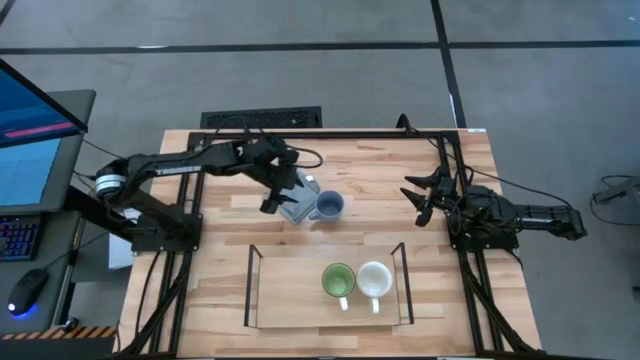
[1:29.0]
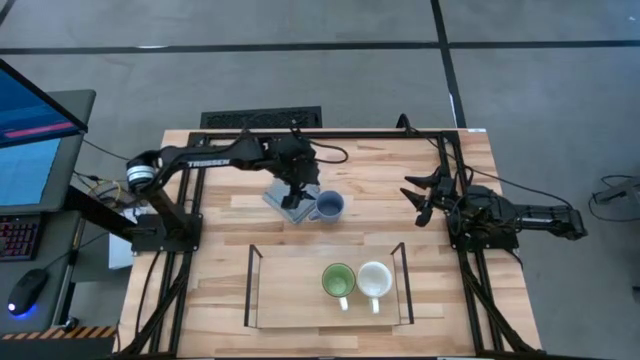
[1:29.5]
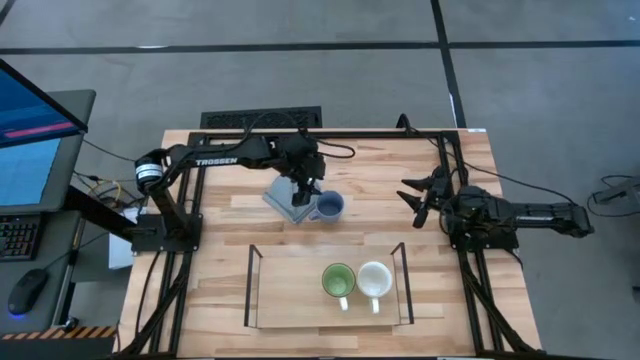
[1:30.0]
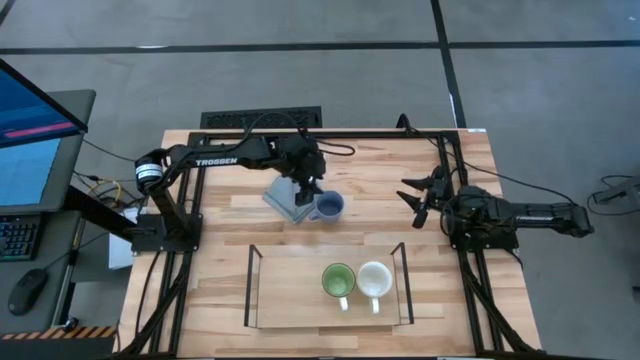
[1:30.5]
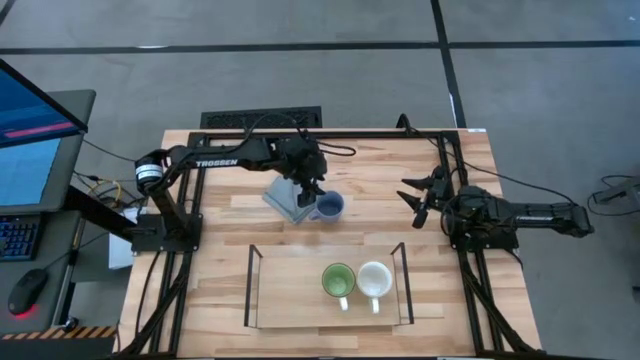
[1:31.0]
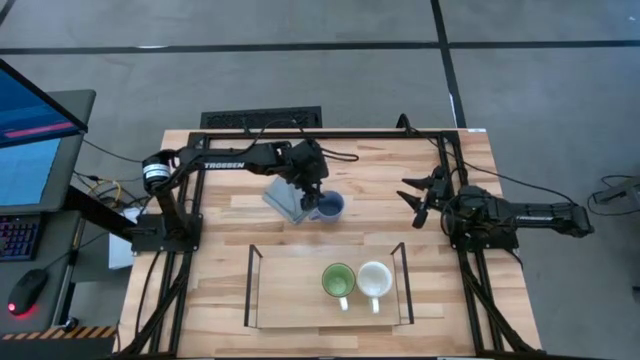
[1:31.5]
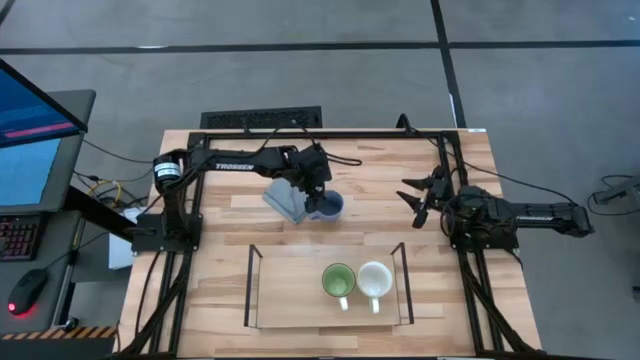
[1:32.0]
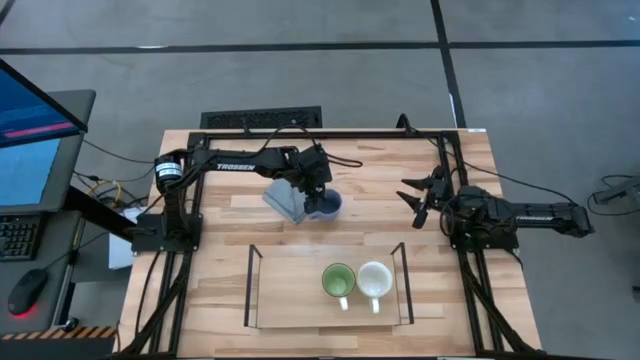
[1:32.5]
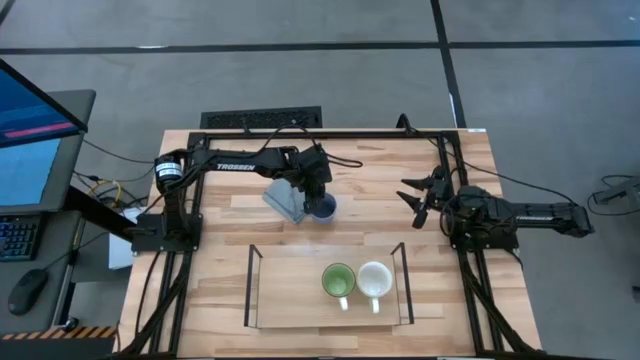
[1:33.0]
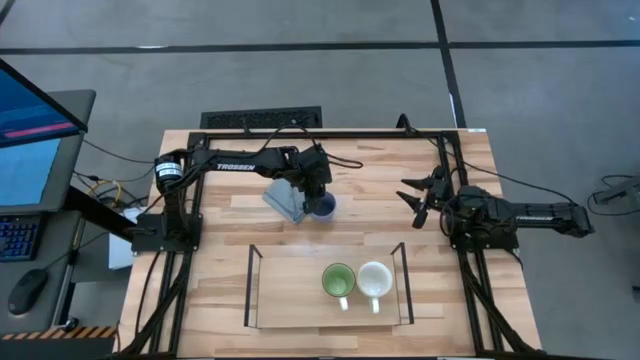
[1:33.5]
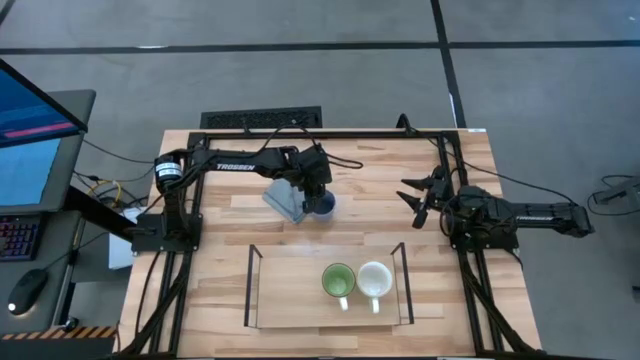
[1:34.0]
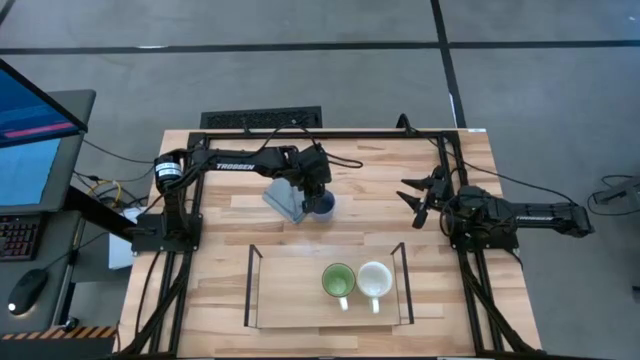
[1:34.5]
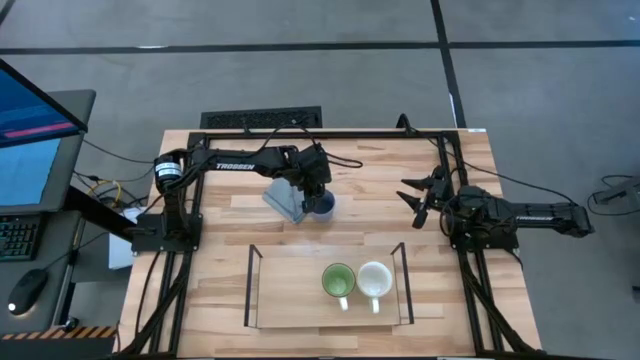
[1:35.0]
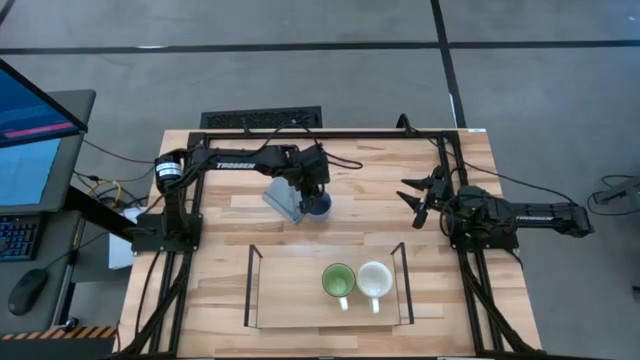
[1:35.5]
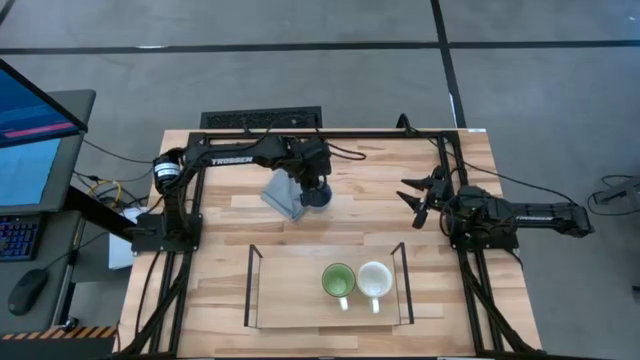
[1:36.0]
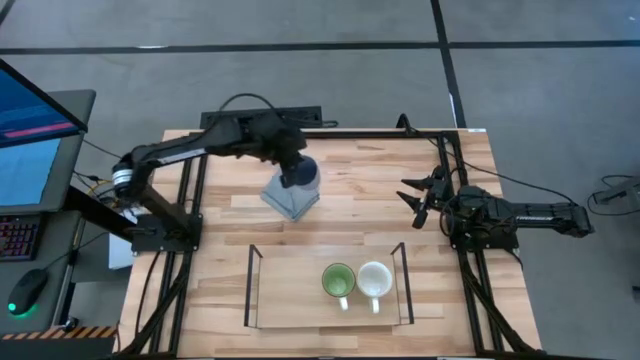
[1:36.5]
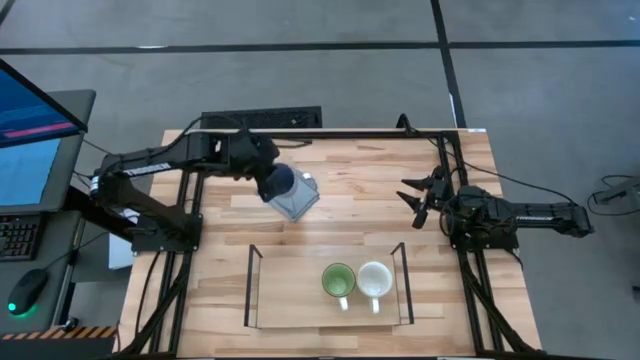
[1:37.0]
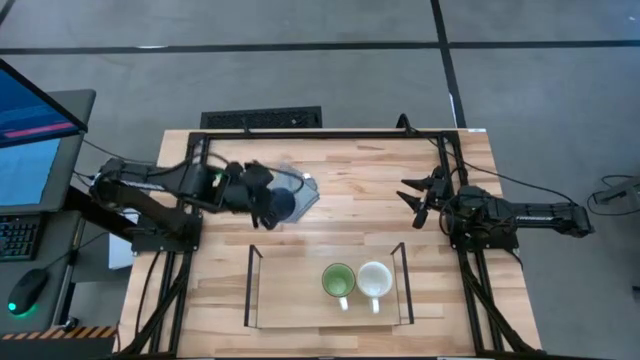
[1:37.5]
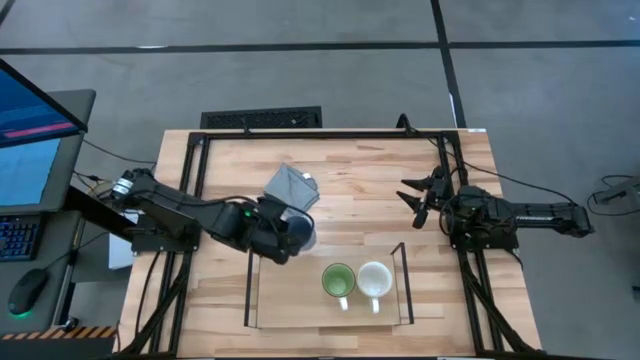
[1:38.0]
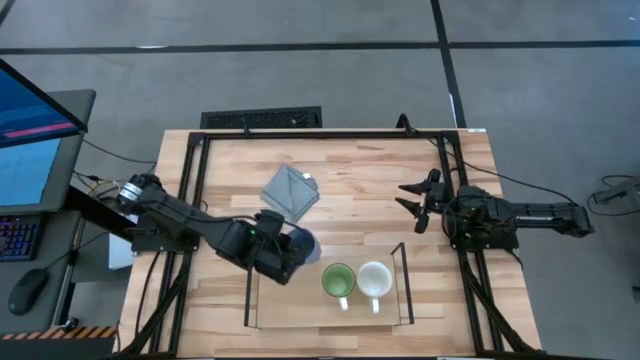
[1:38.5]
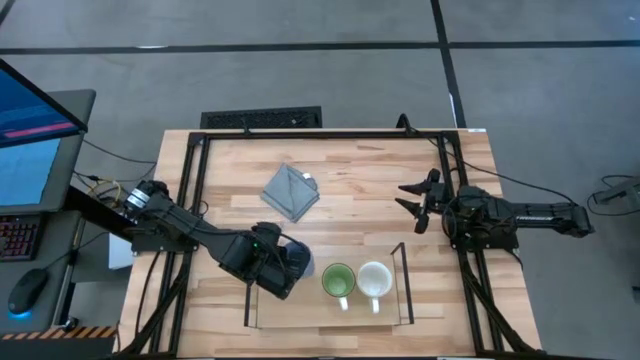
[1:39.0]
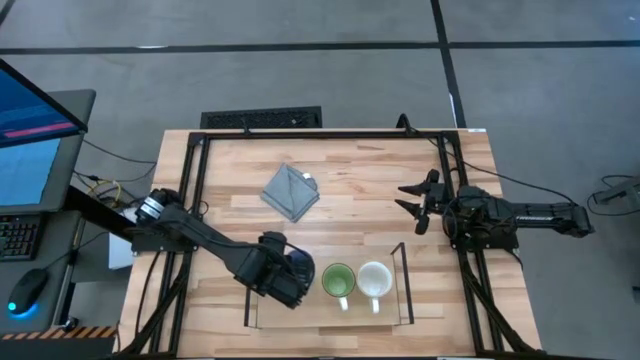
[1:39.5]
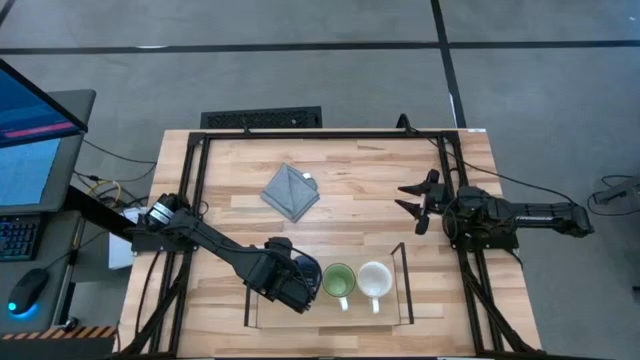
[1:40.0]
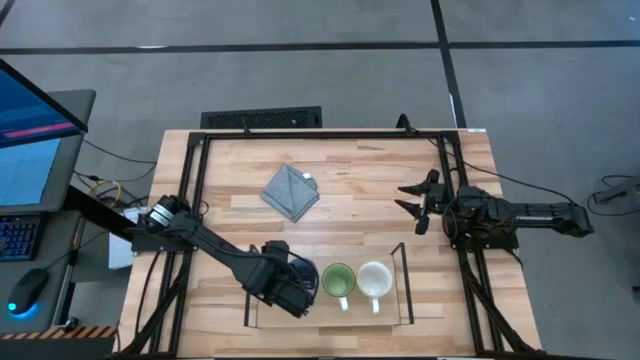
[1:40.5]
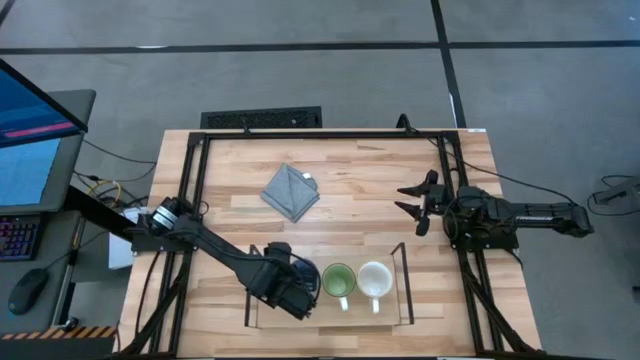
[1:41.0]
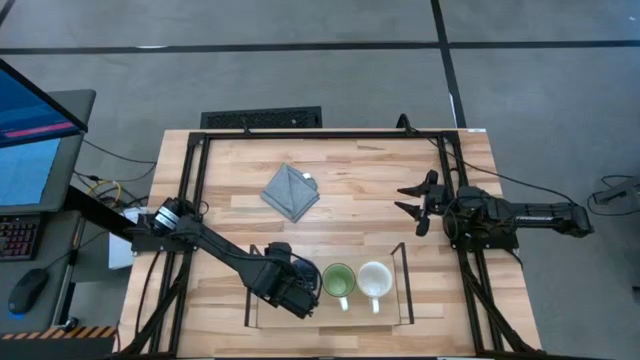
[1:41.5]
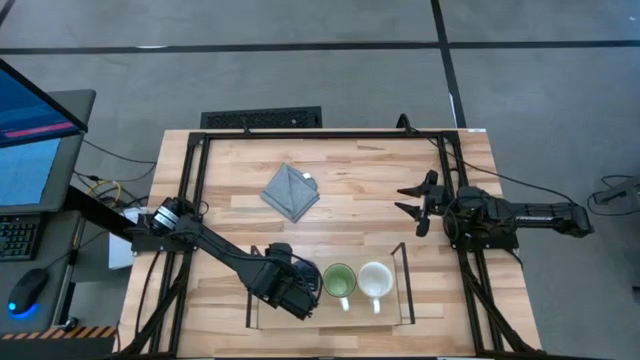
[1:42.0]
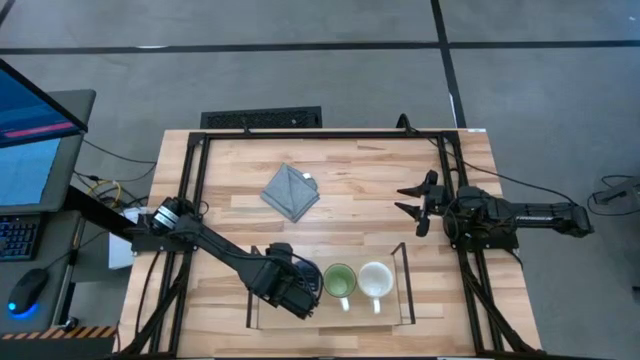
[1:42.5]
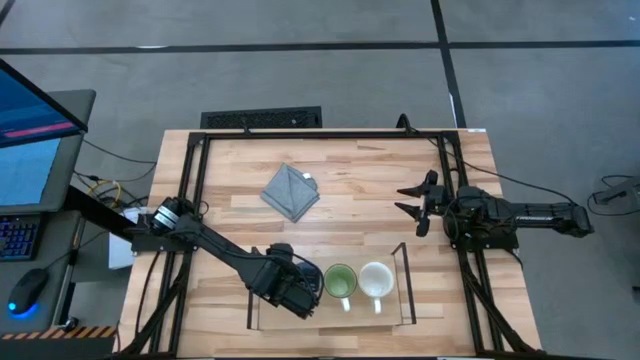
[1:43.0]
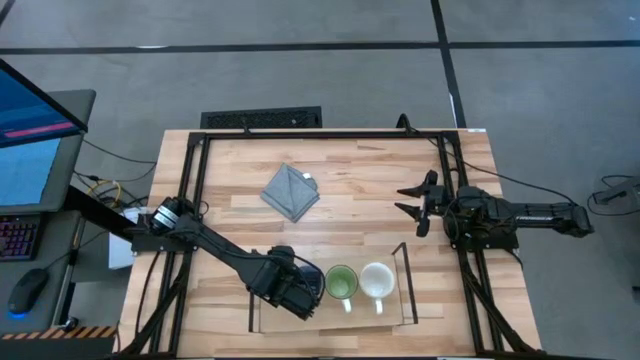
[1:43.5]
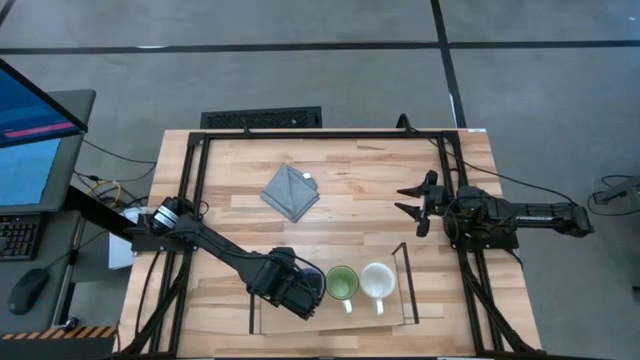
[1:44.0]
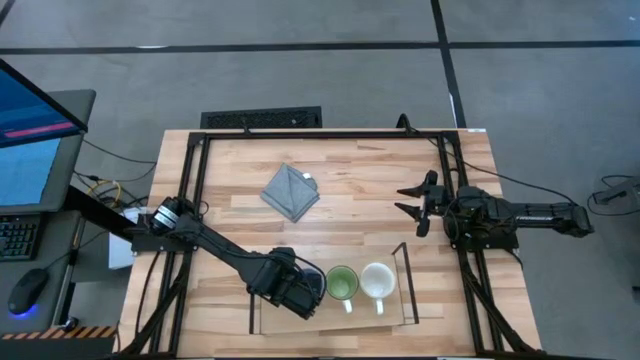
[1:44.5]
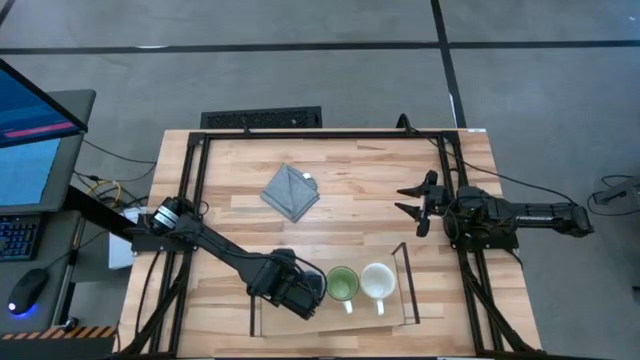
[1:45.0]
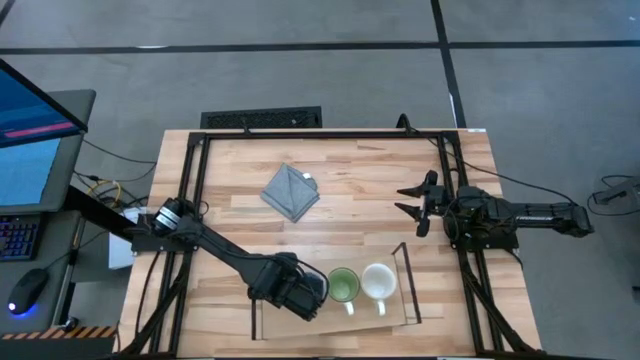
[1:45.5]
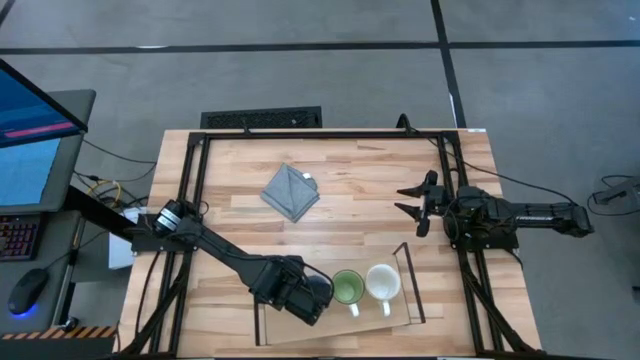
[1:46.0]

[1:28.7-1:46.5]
Task: Stack small to large cups/mugs on shelf
Put the blue mug on the shelf

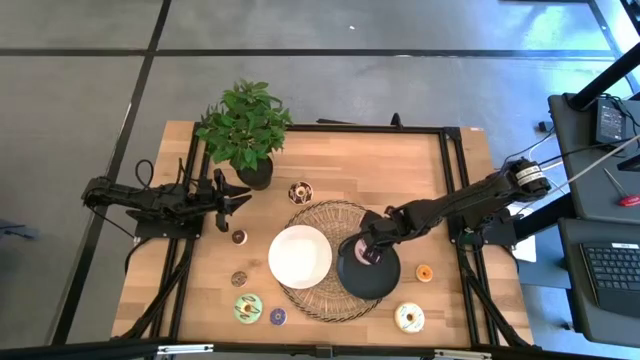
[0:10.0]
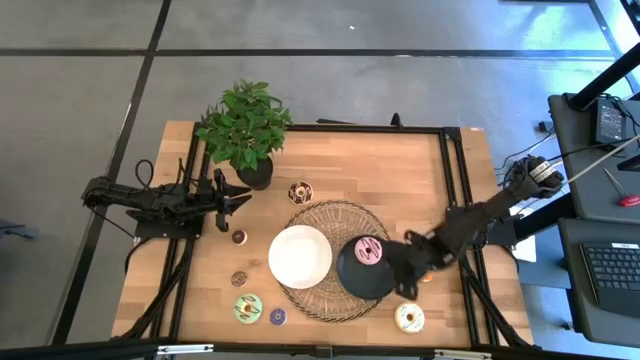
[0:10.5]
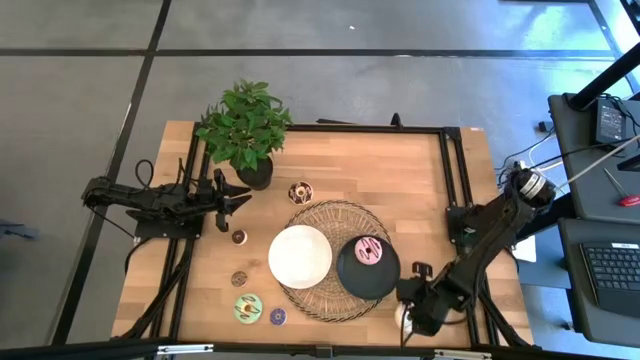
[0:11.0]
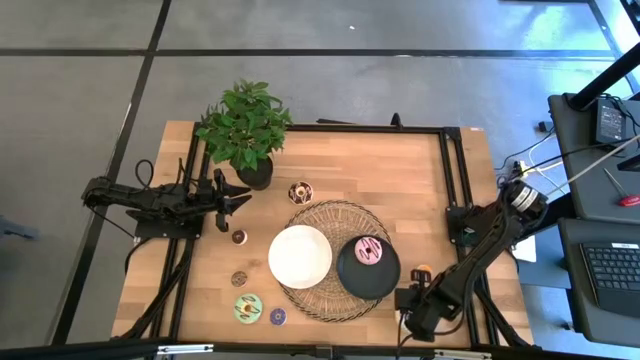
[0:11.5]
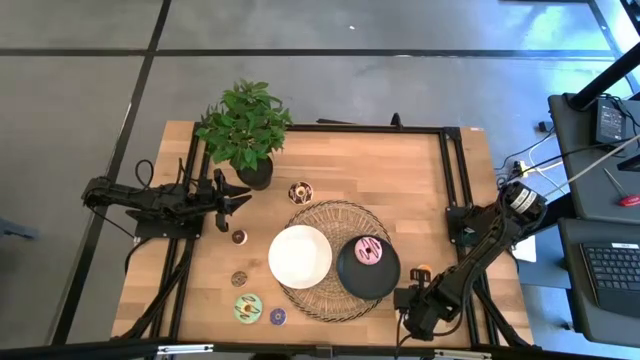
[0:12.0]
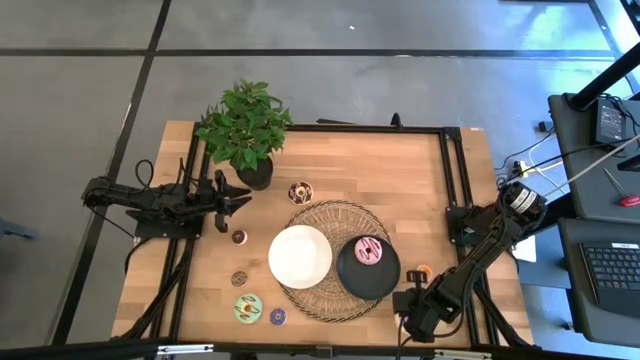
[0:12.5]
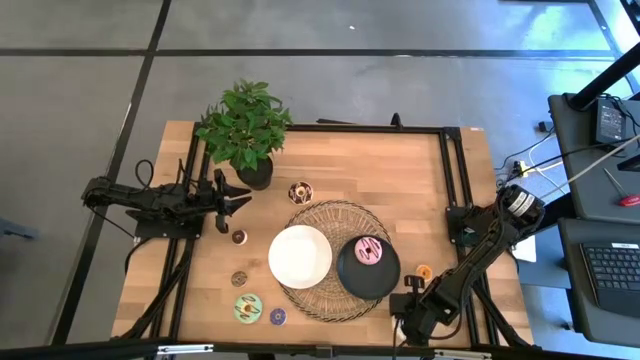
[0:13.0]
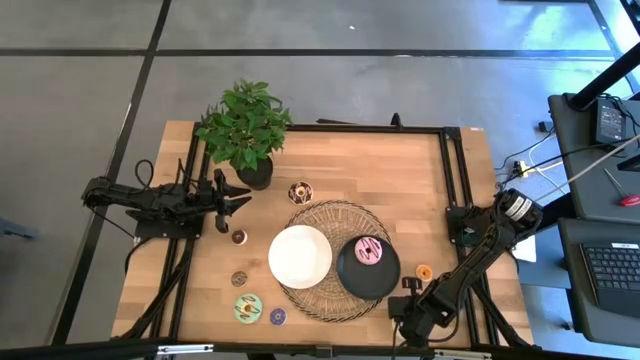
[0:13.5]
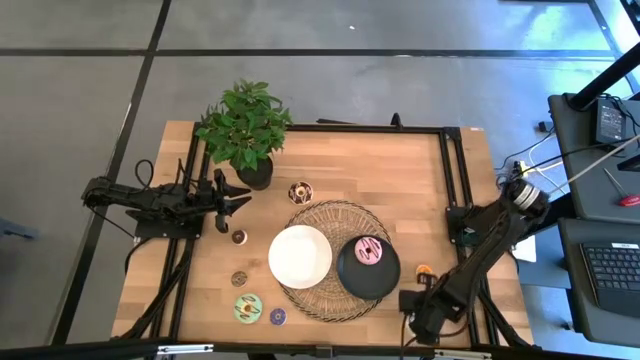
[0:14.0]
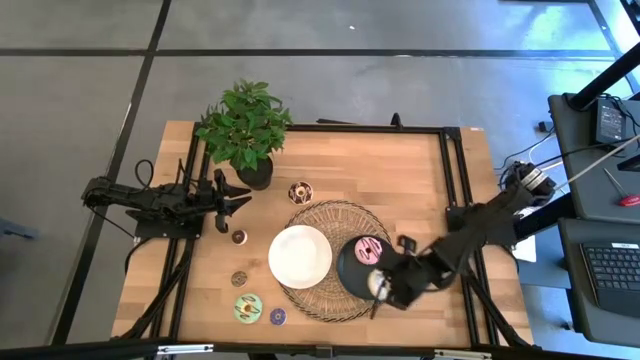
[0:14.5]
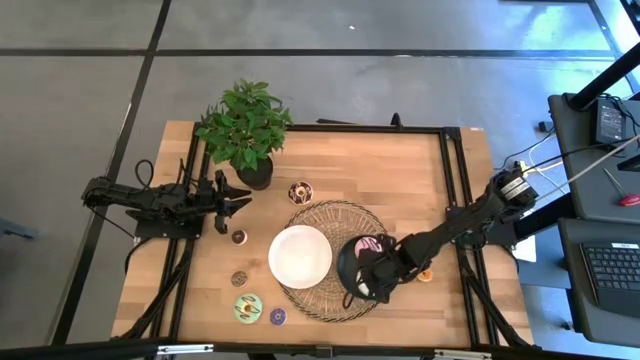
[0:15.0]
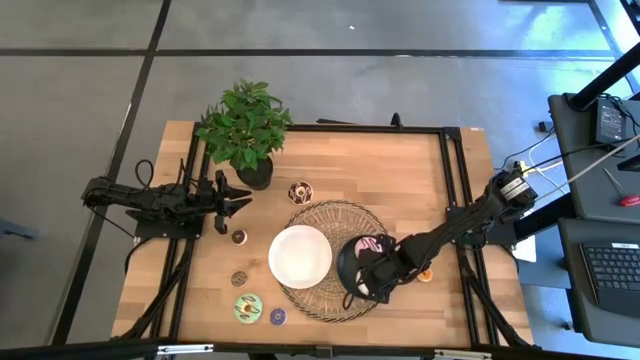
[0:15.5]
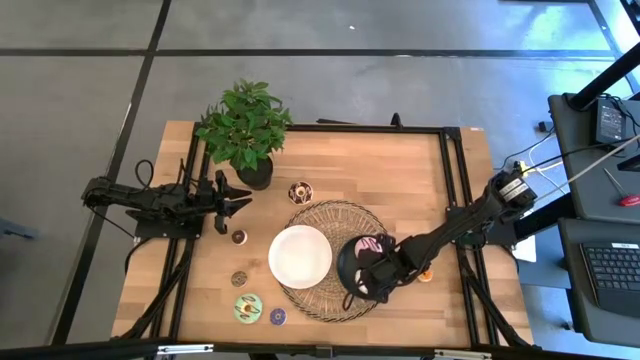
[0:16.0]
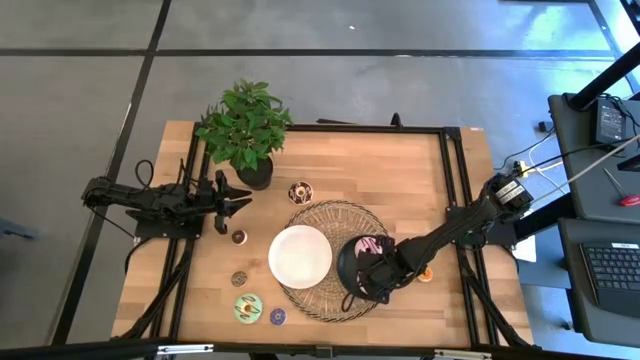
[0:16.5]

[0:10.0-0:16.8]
Task: Pick & Place donuts
Put the large white donut on the black plate
